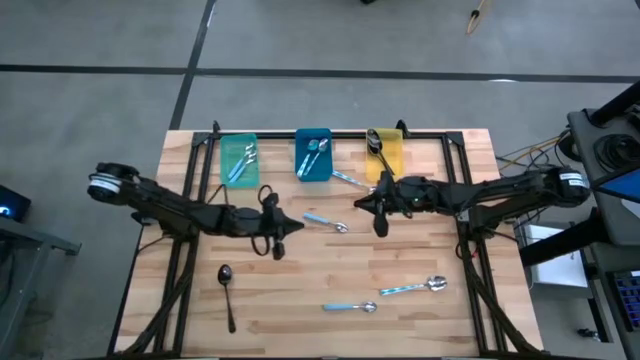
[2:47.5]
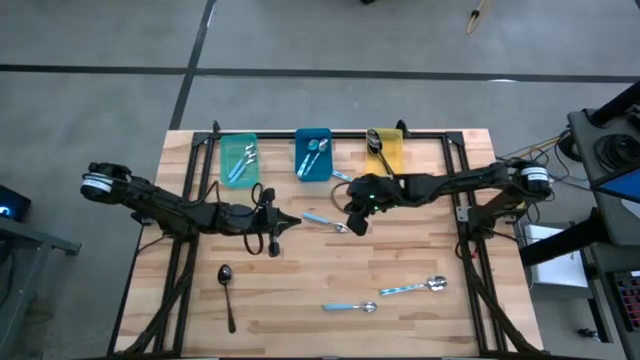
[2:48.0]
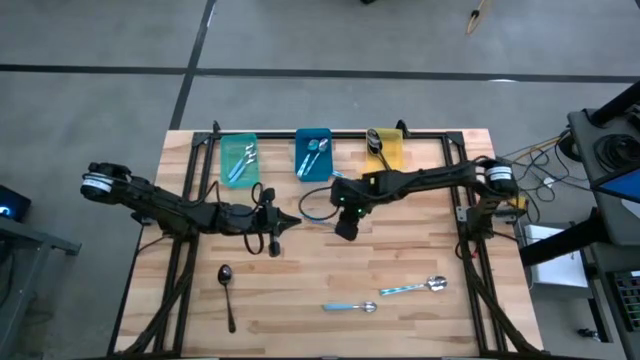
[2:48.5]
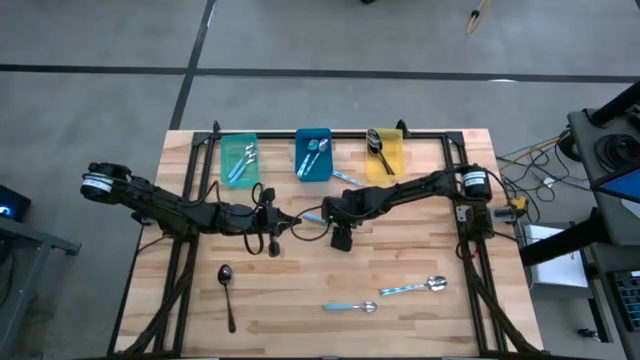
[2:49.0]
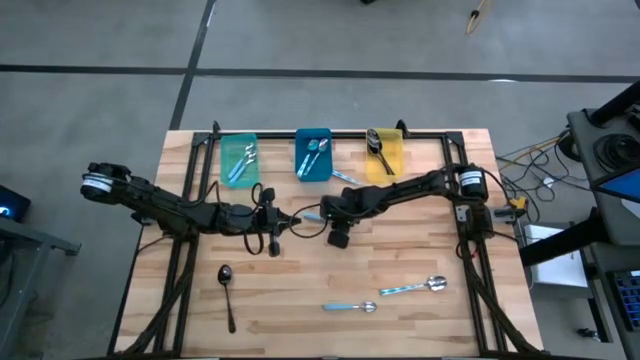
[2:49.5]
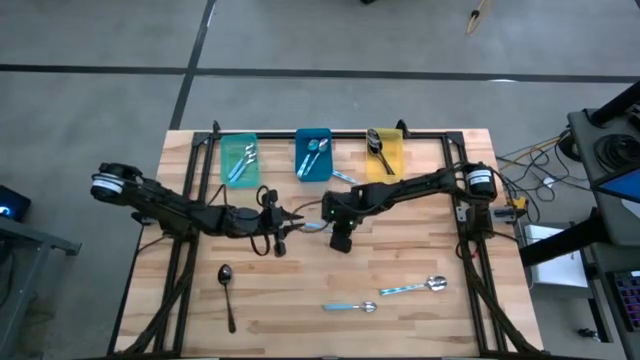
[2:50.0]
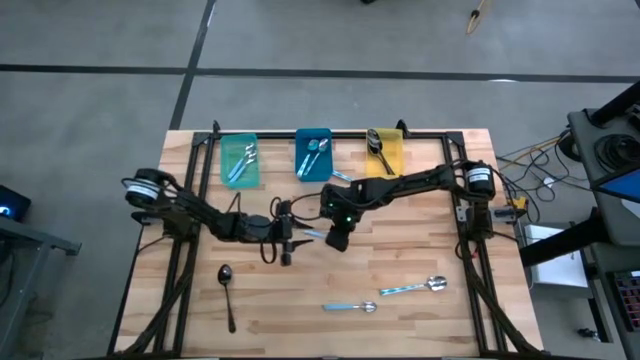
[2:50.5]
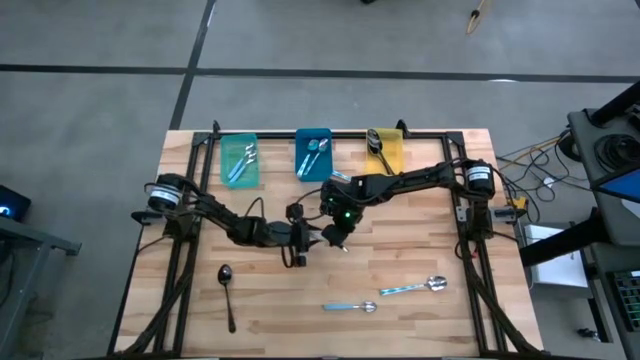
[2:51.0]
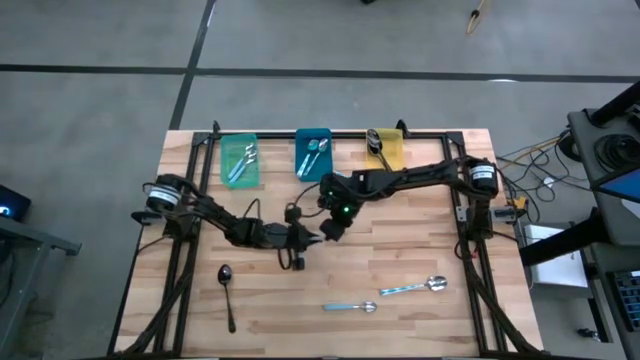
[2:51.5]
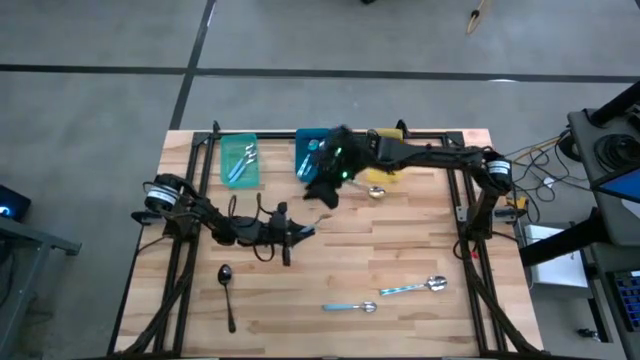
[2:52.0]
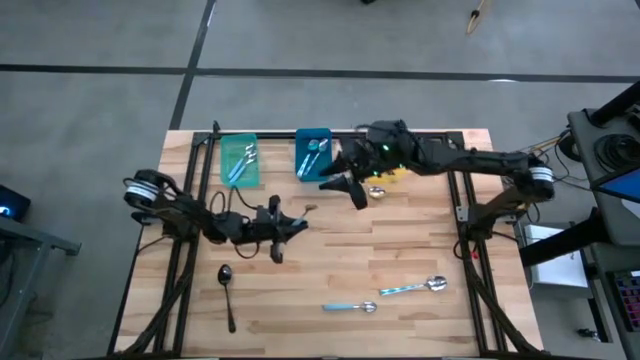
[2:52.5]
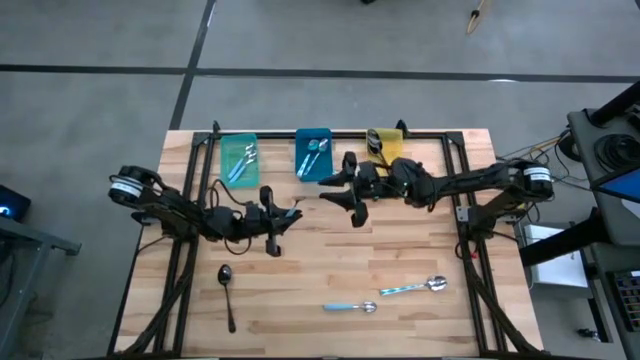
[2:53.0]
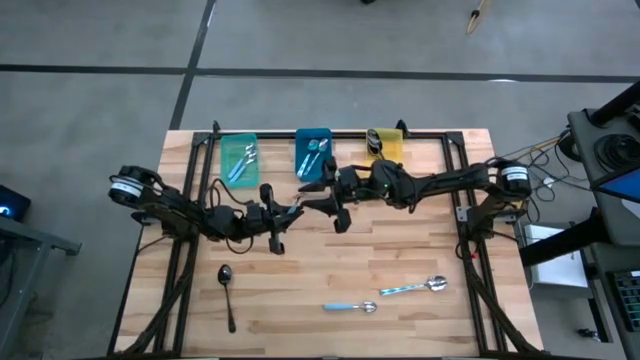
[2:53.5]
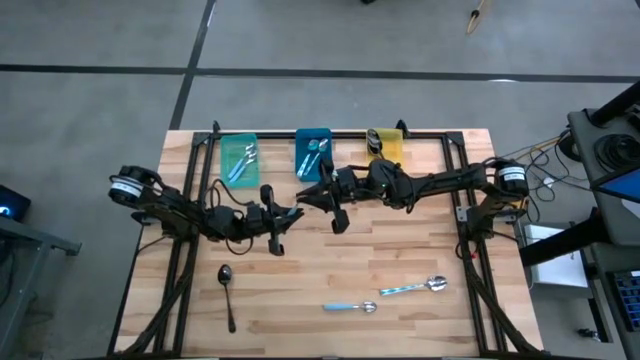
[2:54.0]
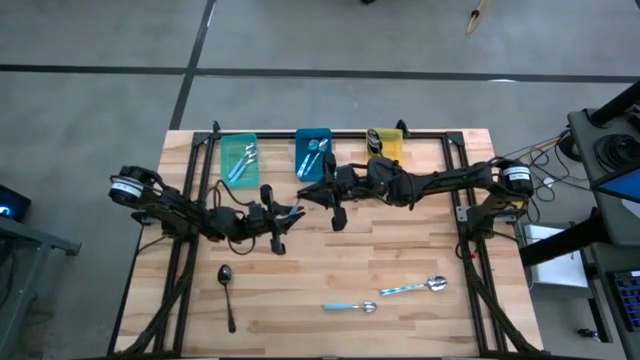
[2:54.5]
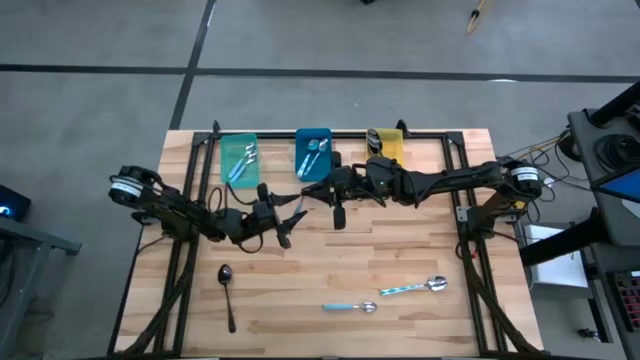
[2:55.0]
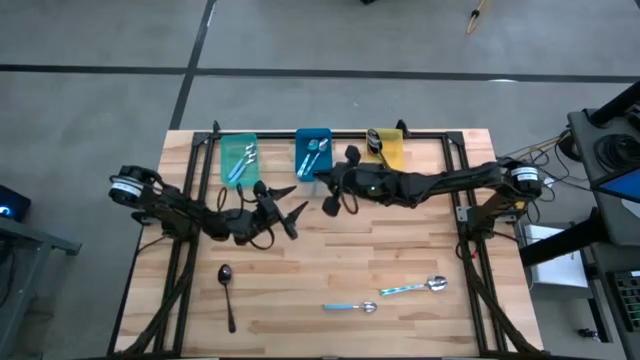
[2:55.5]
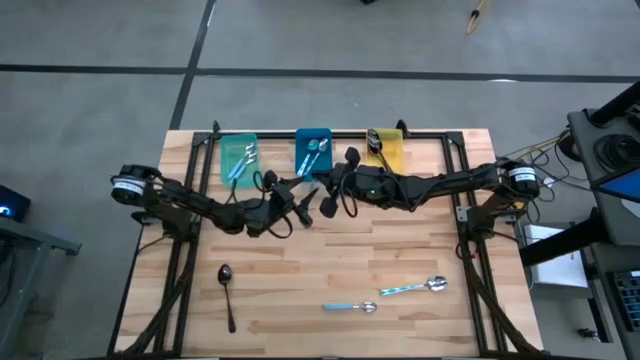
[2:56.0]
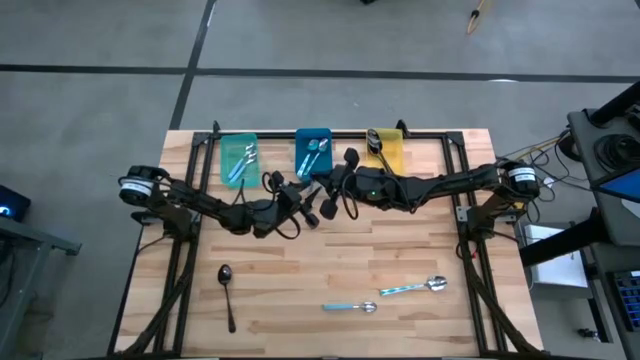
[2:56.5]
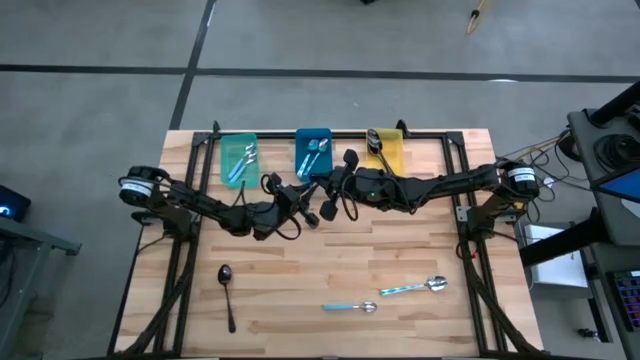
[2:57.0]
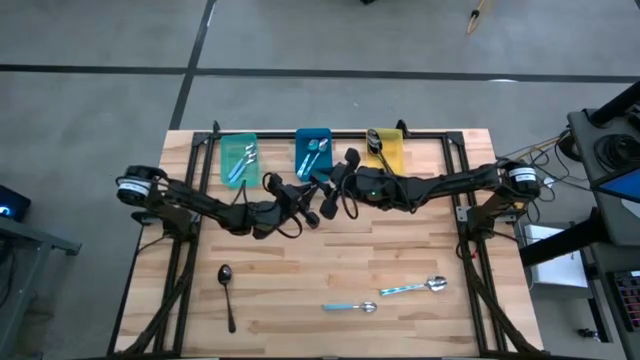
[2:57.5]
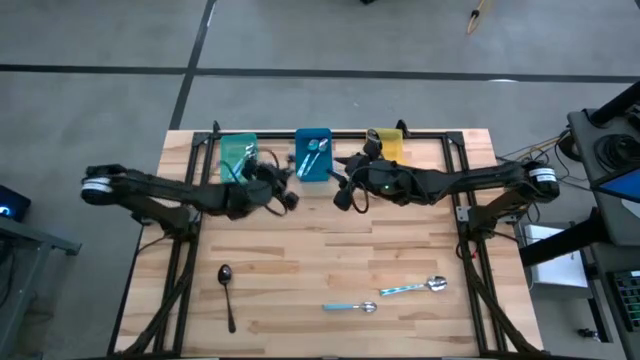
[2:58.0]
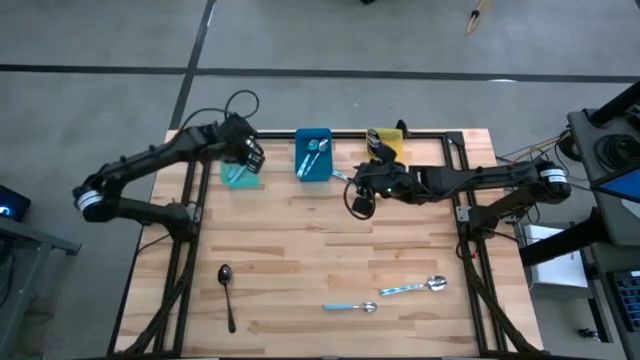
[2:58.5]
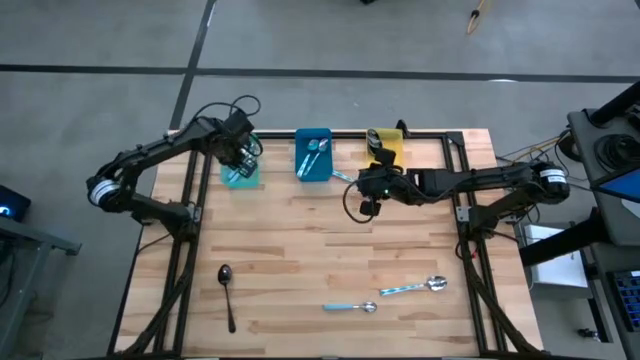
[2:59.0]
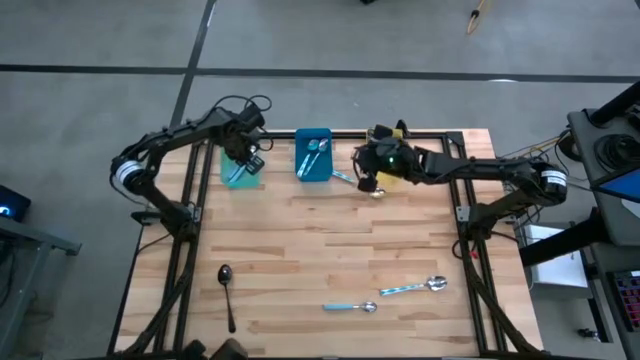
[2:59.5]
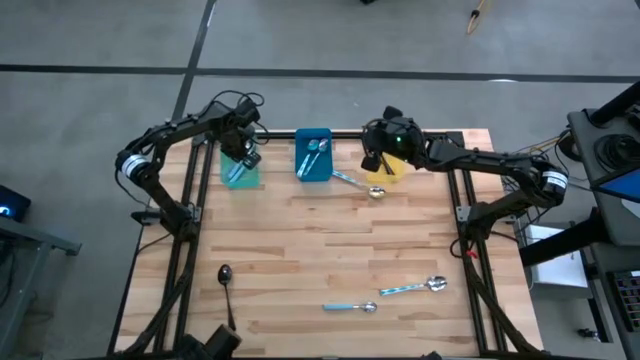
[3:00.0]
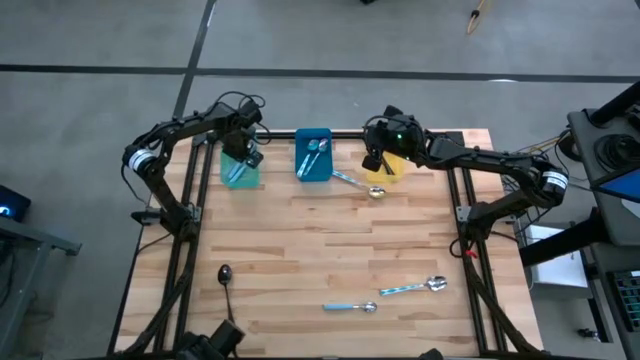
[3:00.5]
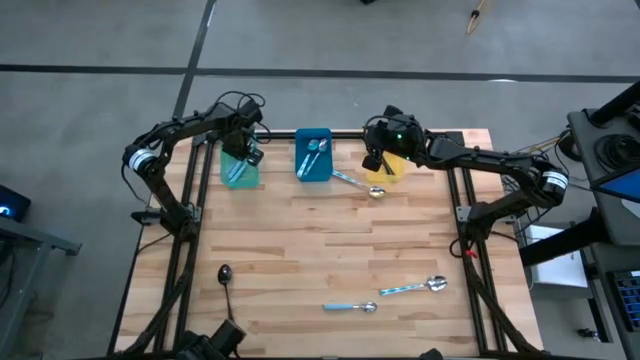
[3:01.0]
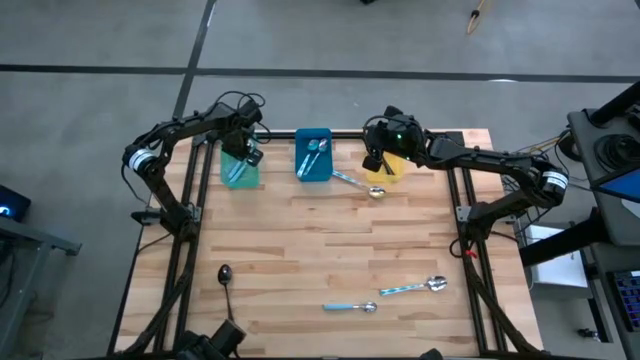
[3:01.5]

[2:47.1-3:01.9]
Task: Sort silverware by color (type)
Put the blue spoon into the green bin

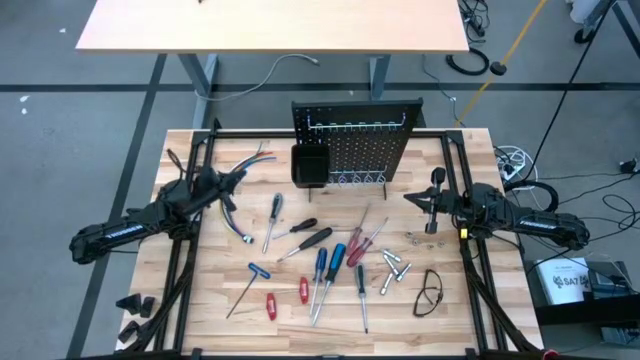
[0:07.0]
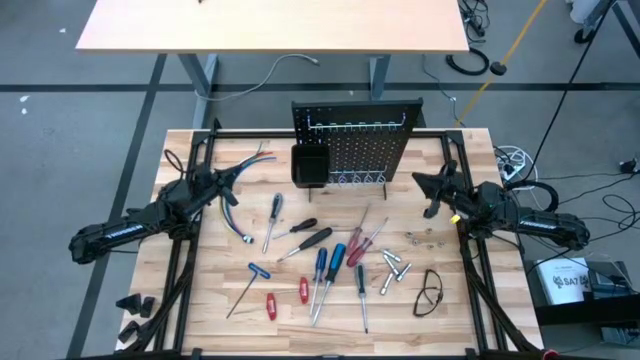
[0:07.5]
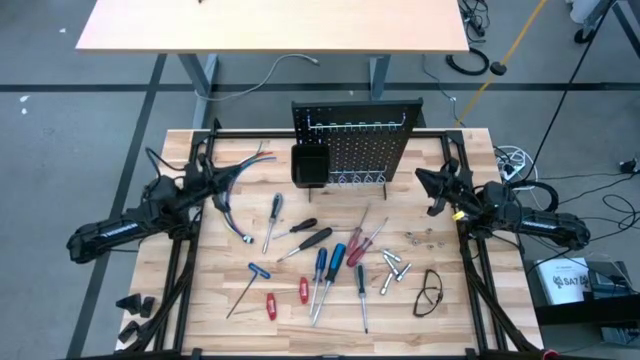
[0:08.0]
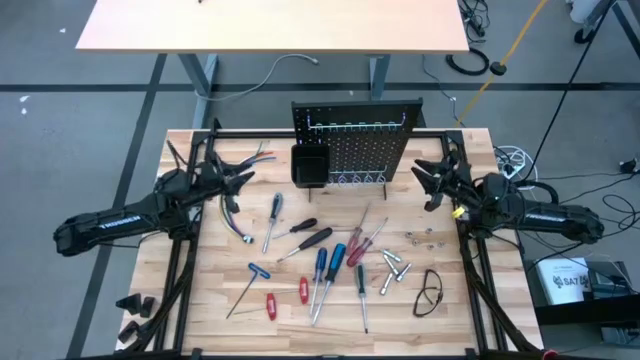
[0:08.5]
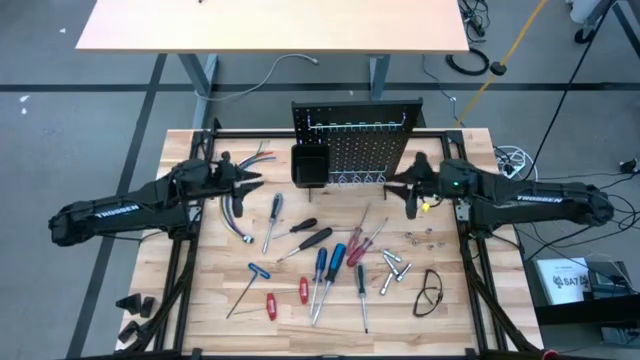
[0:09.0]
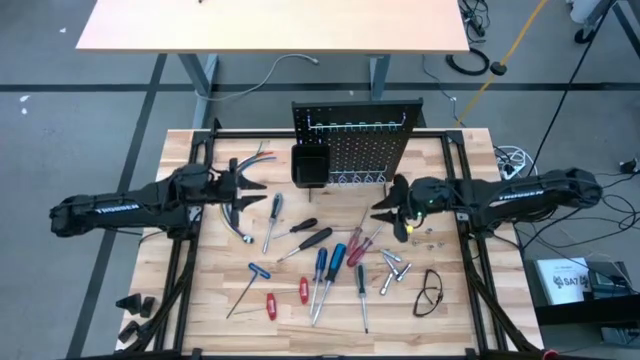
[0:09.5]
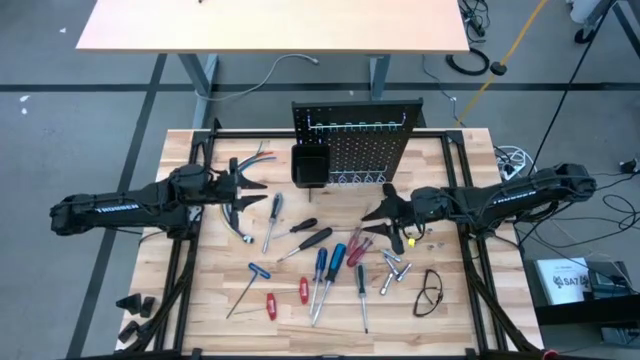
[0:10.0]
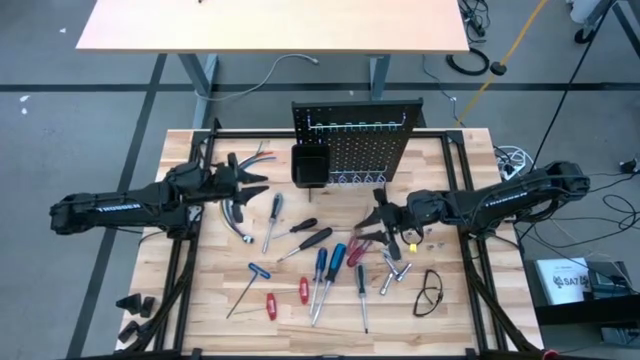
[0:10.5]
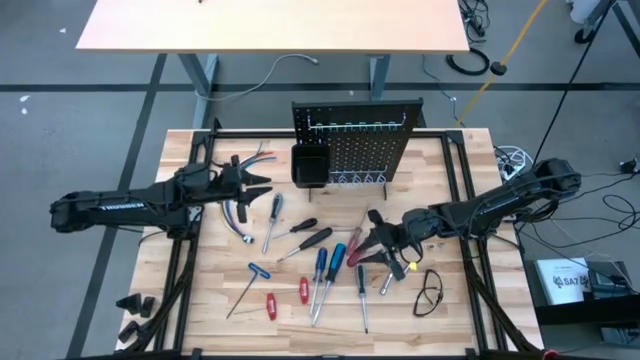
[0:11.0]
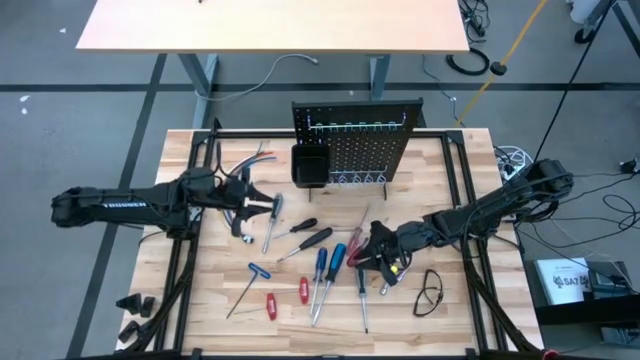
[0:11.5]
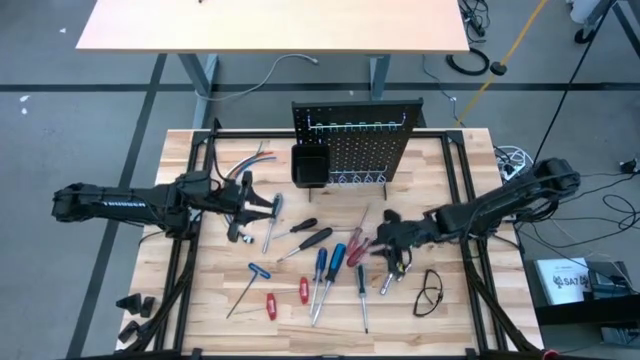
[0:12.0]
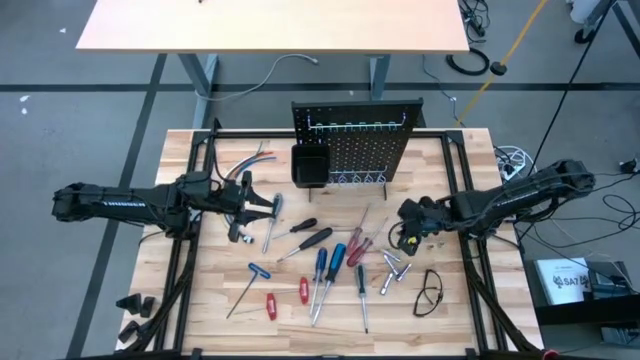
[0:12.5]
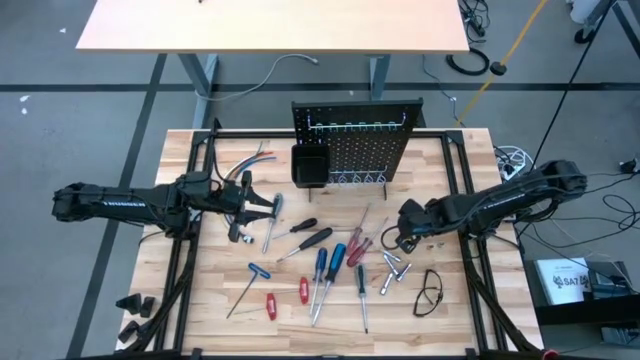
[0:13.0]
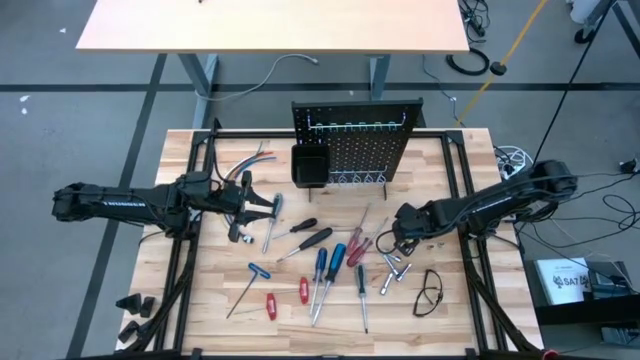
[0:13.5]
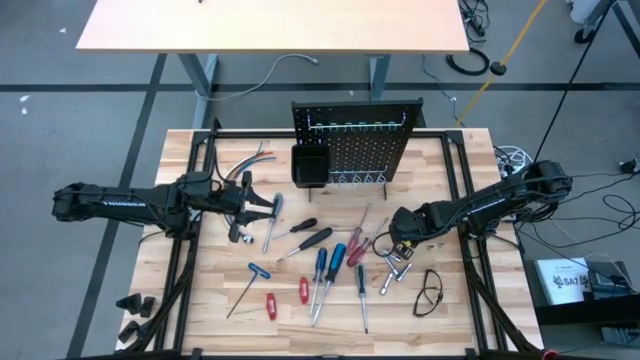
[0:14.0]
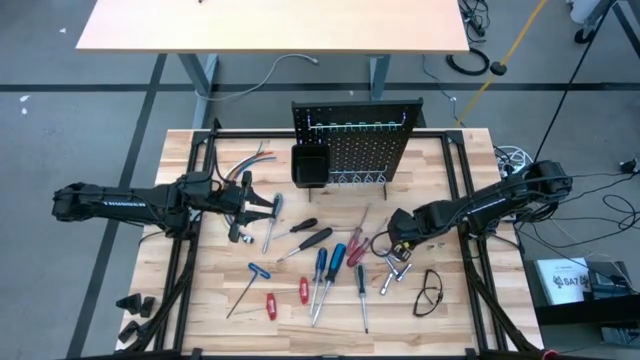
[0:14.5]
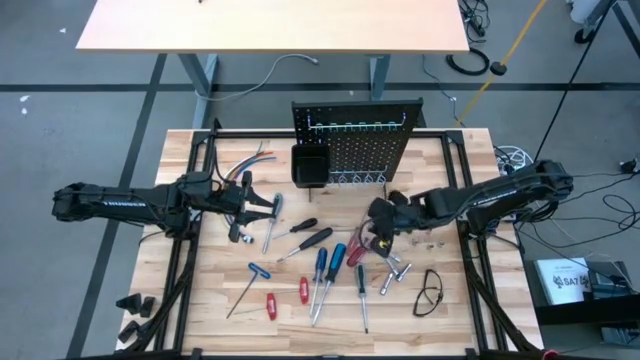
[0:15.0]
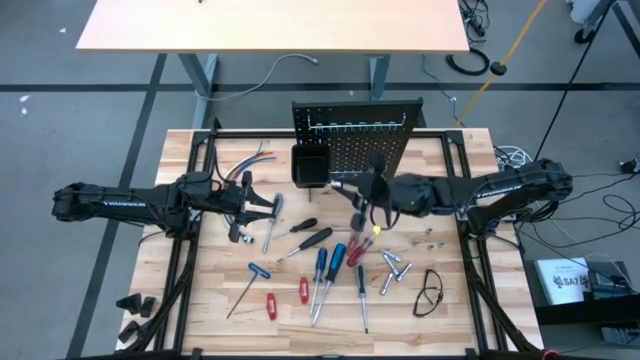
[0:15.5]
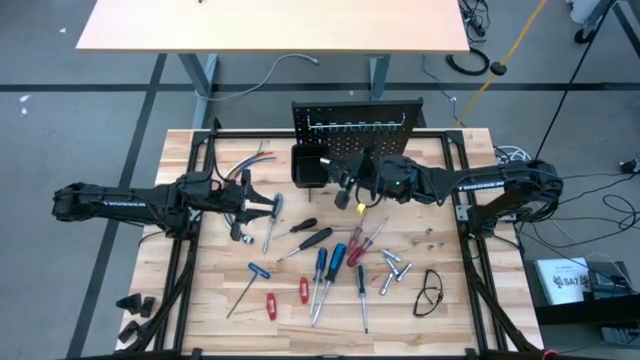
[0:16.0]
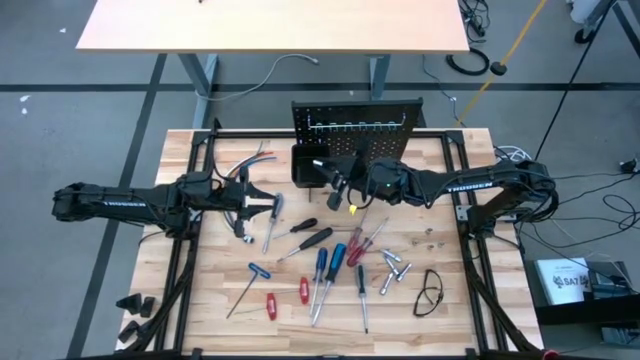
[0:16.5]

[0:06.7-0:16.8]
Task: Hang tools onto peg board
Put the socket in the black bin on the peg board
